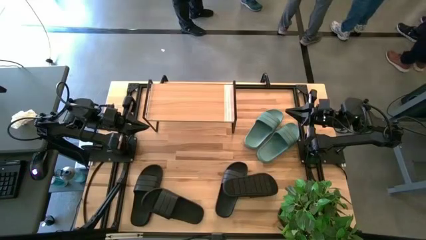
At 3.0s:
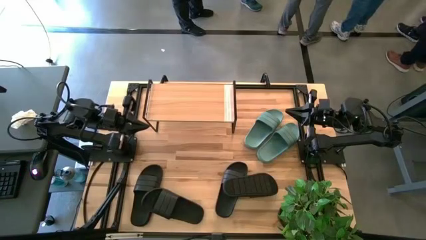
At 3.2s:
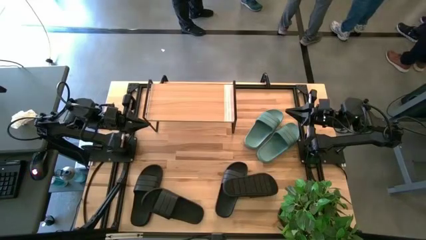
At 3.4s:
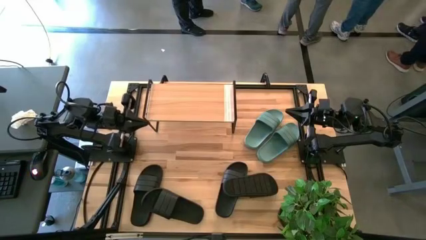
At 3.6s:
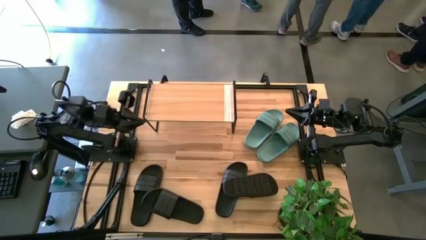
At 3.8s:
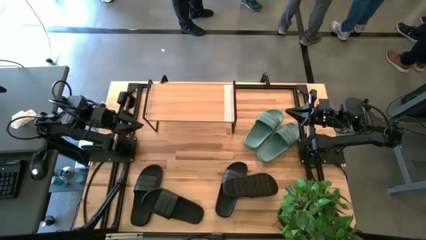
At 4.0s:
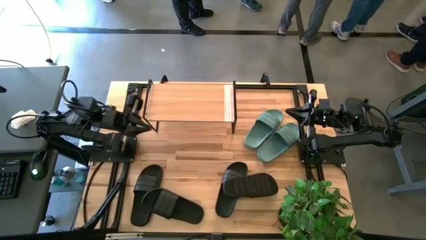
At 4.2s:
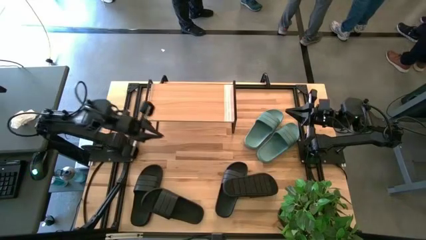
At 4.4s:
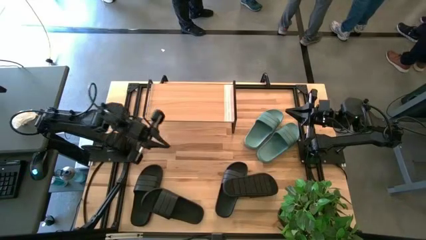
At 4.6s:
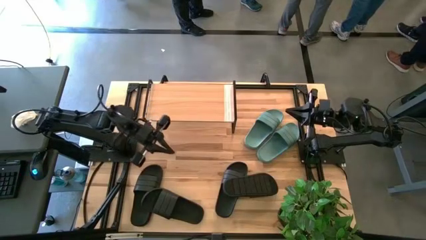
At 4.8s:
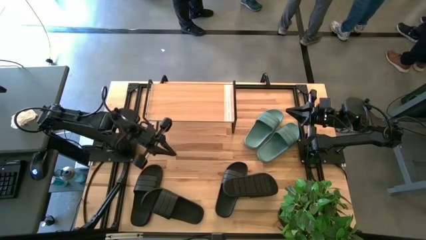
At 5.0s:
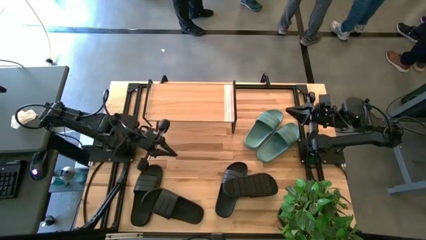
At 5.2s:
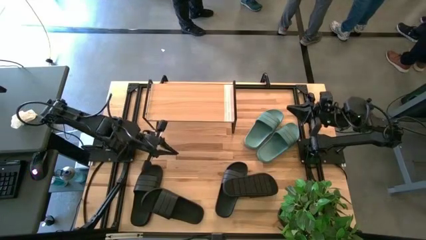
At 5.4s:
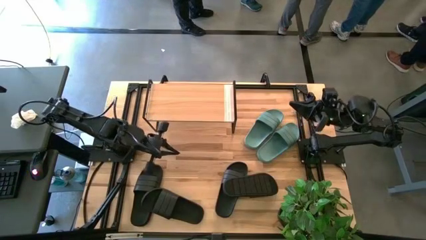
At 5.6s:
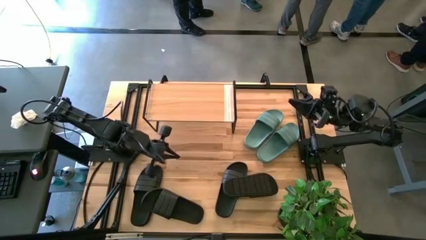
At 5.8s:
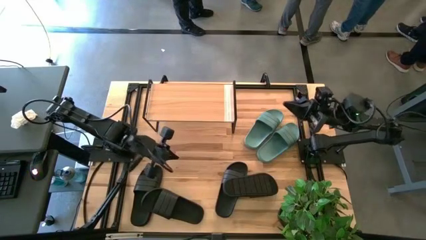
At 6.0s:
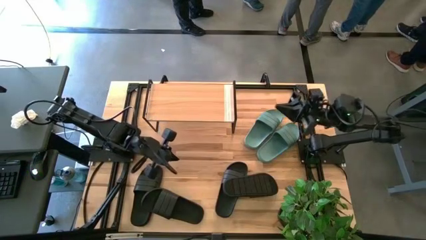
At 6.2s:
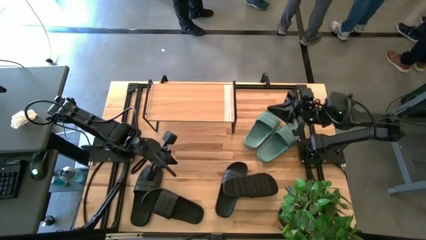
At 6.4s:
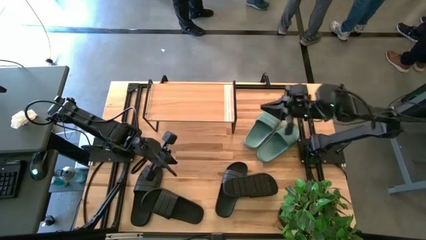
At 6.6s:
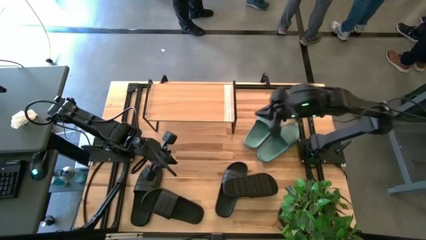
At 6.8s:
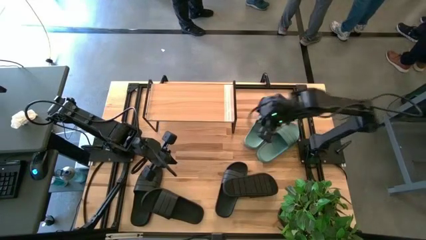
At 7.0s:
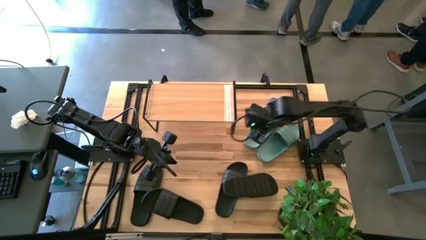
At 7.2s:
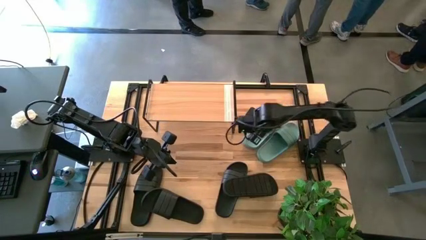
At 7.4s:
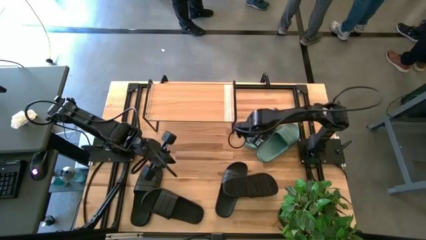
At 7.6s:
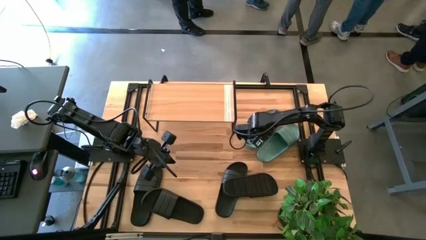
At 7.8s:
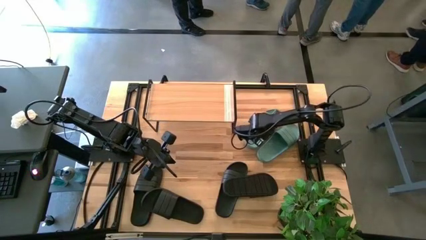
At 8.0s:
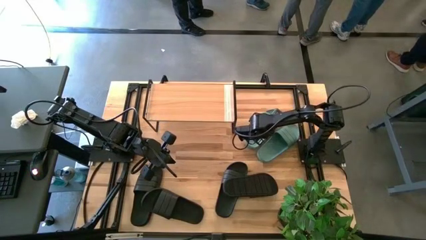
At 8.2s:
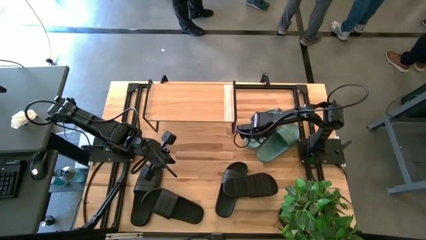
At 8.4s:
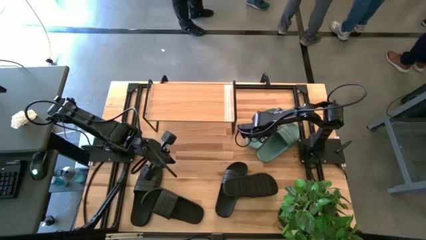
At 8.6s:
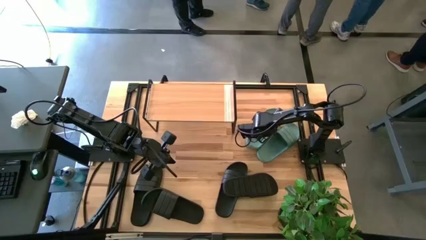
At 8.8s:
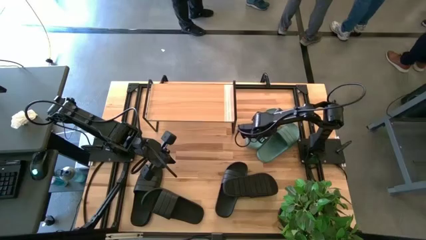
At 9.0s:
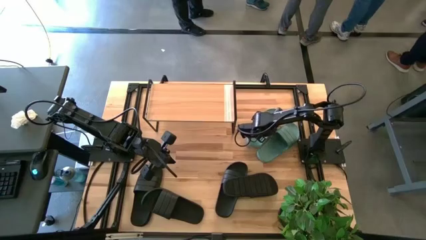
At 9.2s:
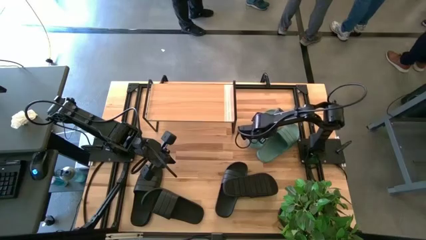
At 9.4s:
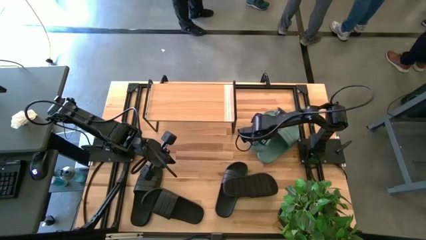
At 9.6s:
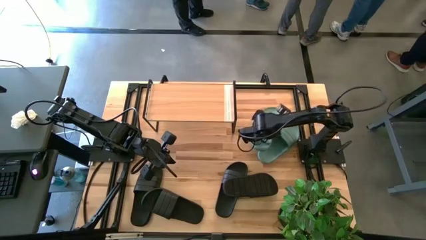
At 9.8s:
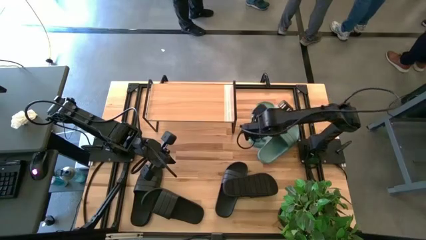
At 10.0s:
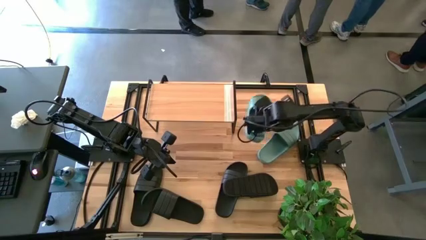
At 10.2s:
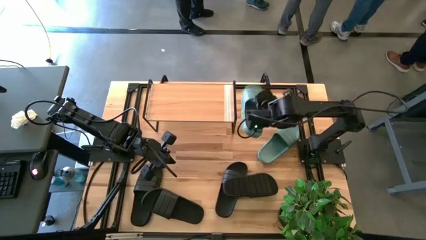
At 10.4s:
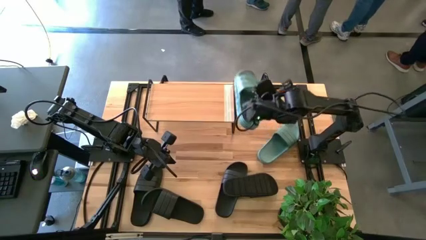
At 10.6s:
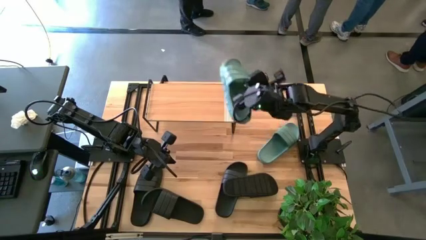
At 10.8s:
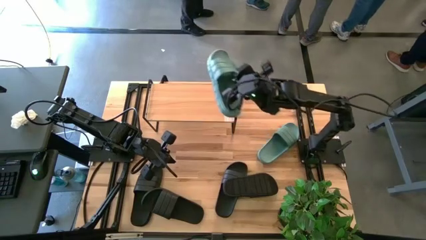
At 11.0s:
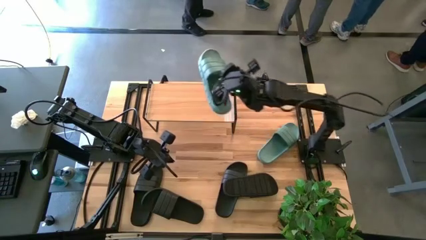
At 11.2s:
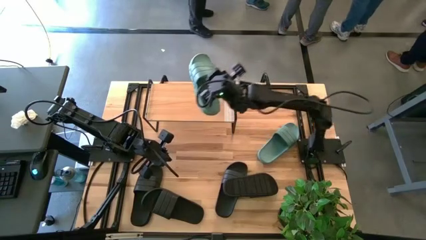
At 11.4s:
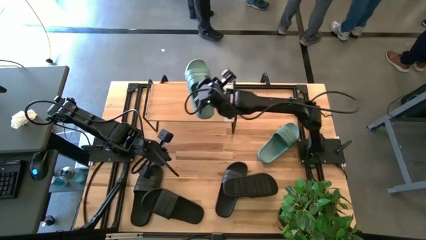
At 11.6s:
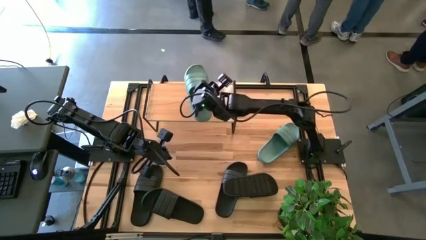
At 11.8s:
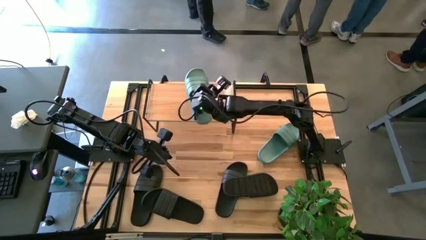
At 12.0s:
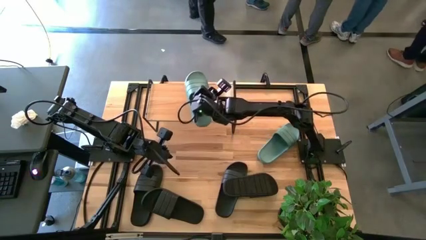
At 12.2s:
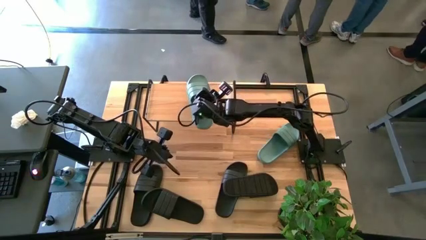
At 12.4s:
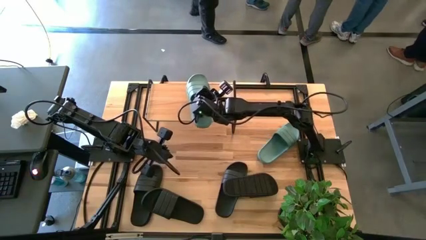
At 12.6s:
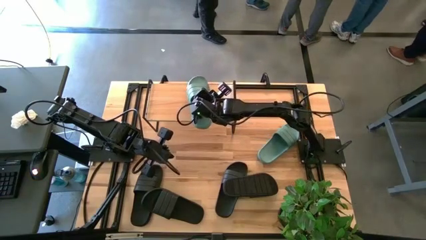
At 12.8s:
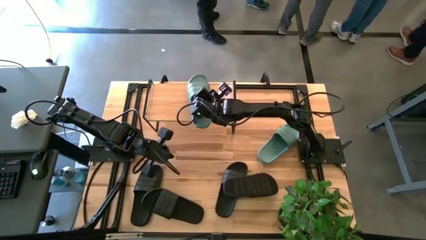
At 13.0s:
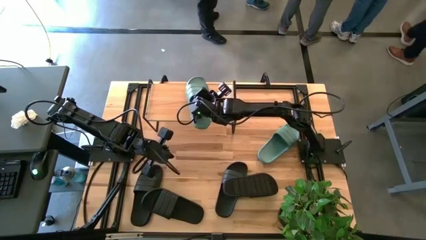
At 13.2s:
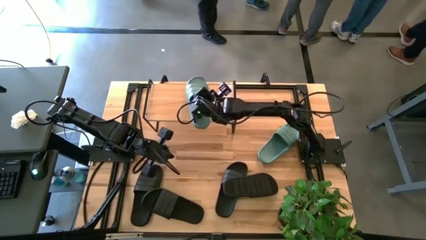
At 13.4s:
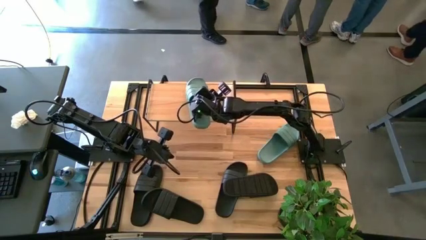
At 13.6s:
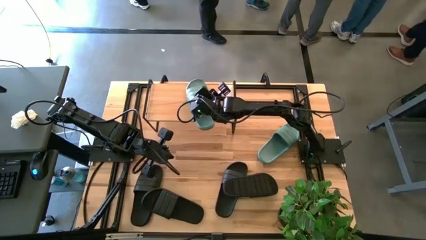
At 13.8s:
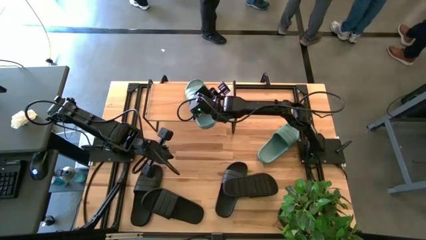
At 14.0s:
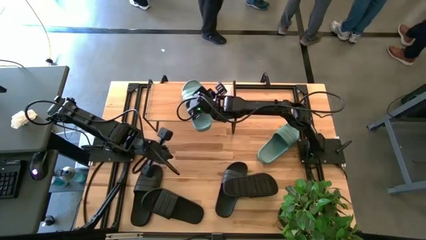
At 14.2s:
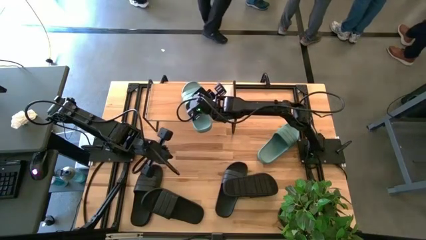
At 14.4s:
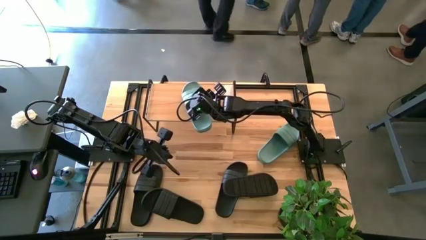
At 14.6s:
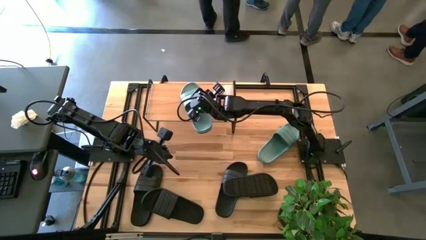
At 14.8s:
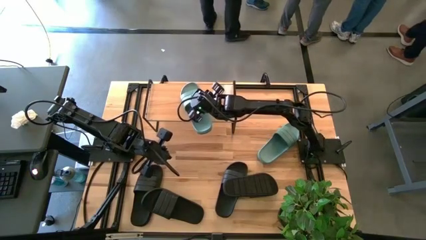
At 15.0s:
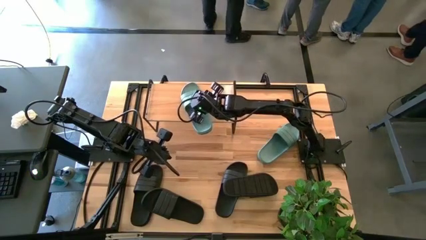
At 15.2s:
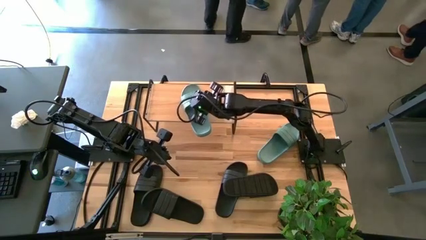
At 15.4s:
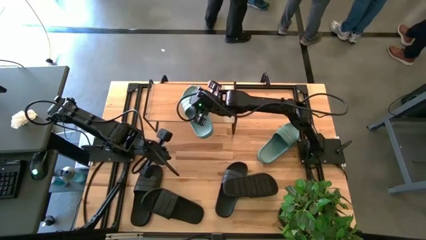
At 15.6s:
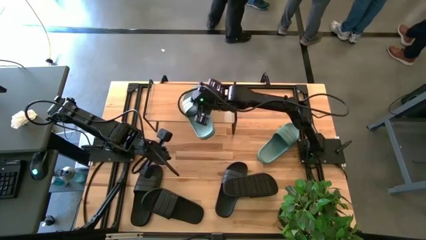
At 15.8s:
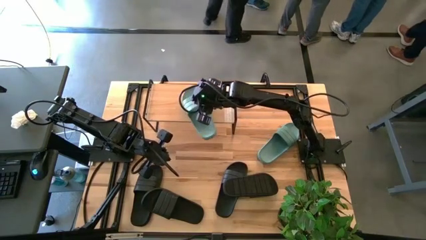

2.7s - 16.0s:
Task: Pick and place slides into the shelf
Put the blue slide on the shelf
